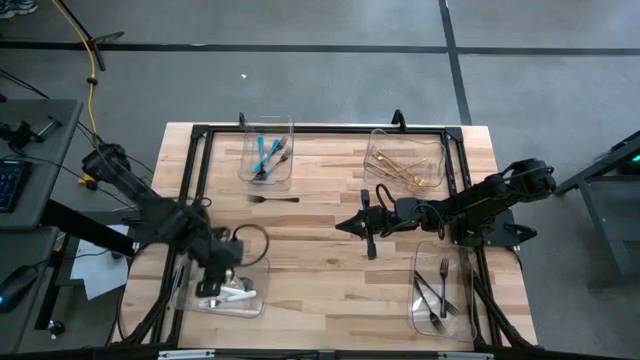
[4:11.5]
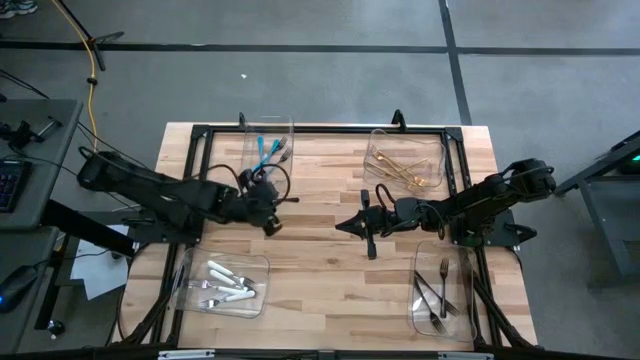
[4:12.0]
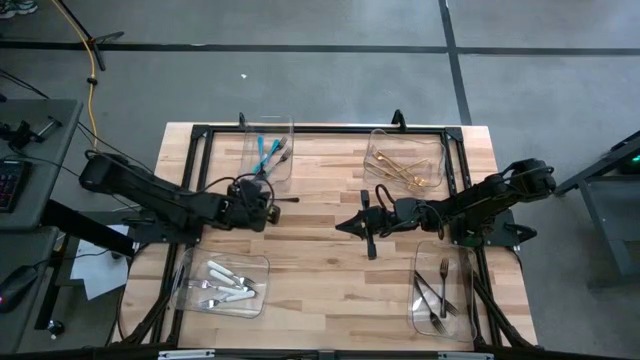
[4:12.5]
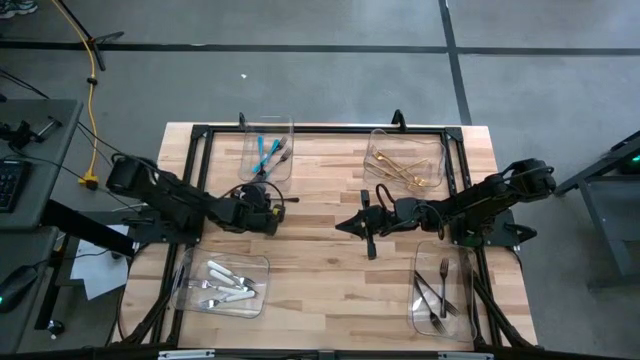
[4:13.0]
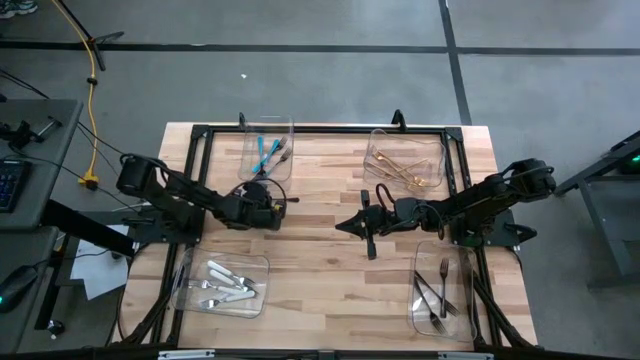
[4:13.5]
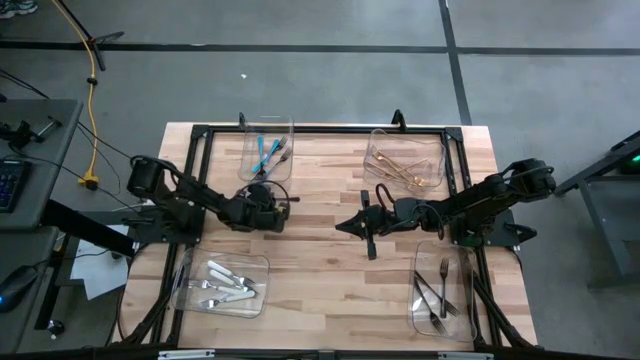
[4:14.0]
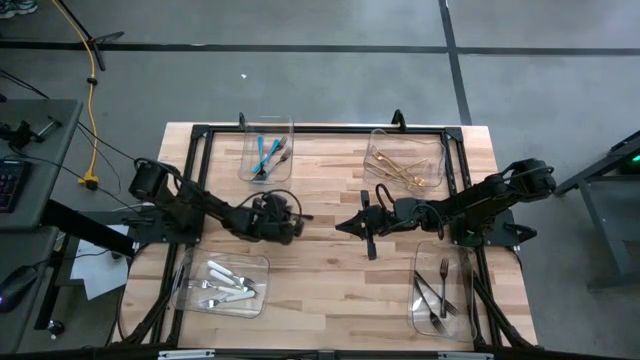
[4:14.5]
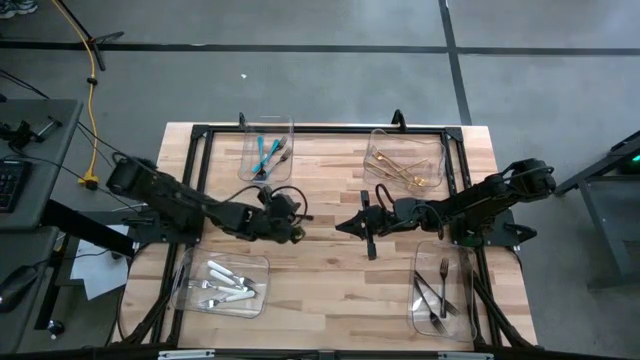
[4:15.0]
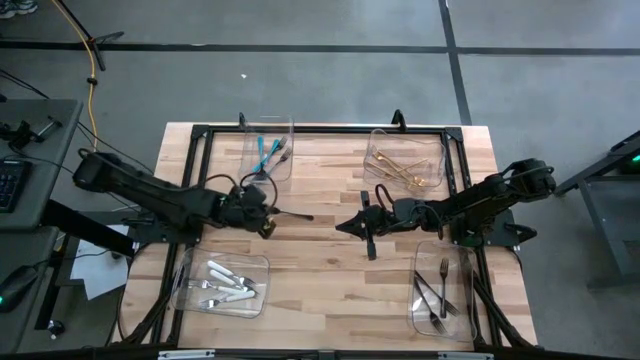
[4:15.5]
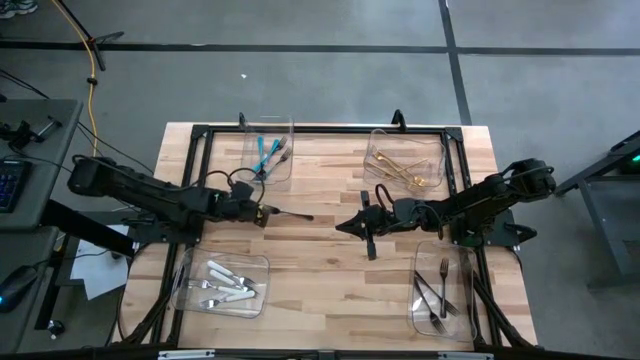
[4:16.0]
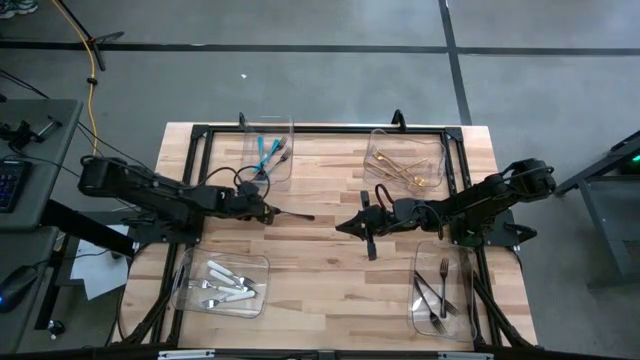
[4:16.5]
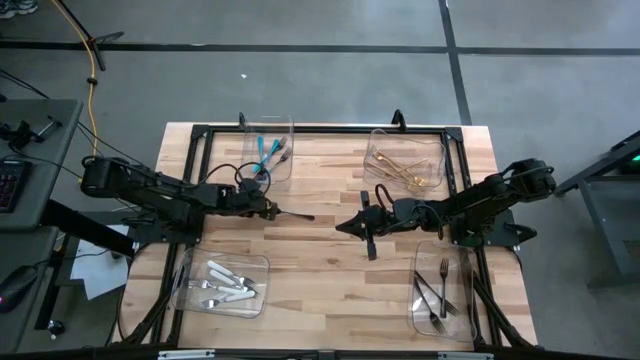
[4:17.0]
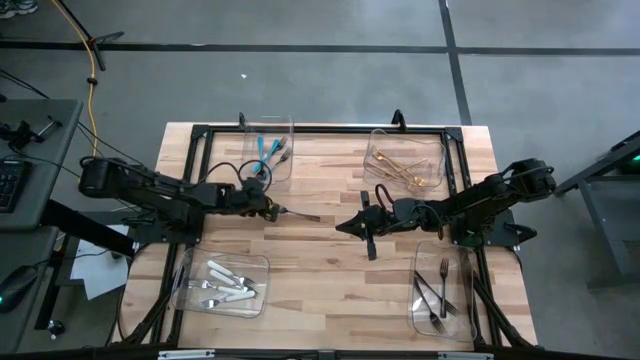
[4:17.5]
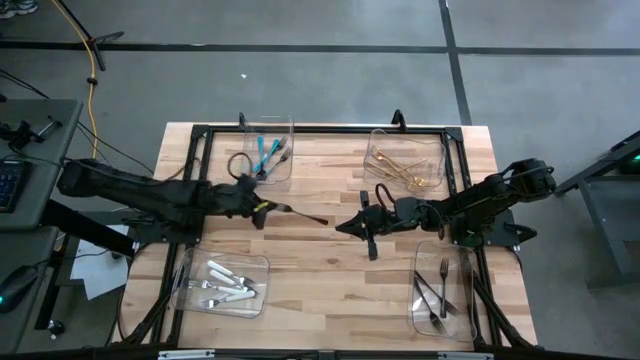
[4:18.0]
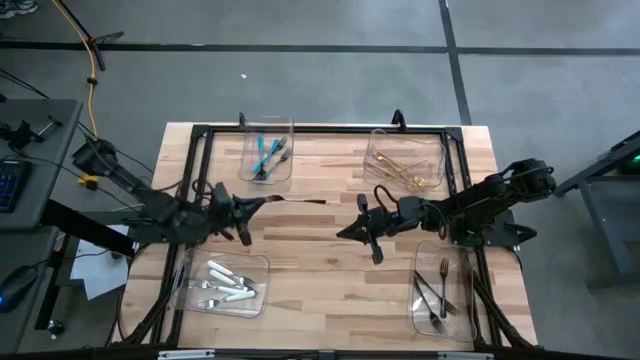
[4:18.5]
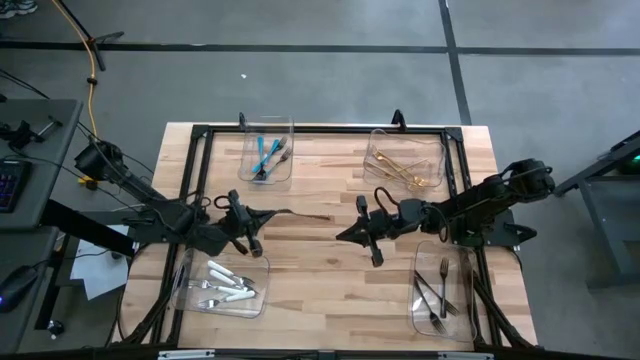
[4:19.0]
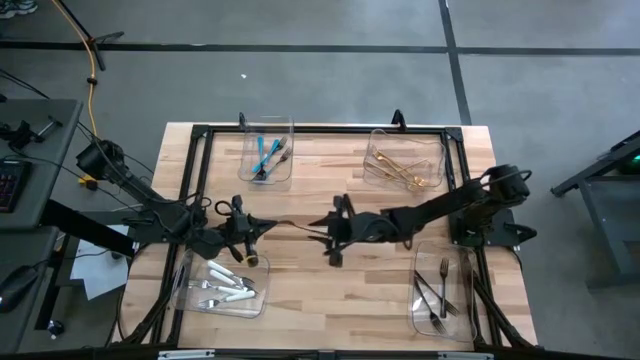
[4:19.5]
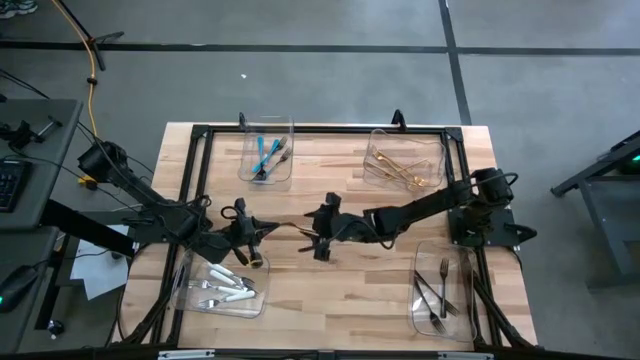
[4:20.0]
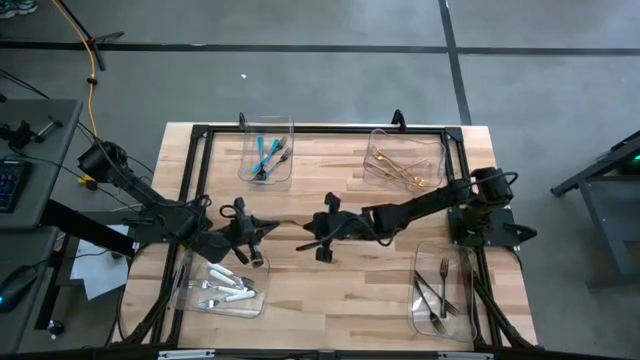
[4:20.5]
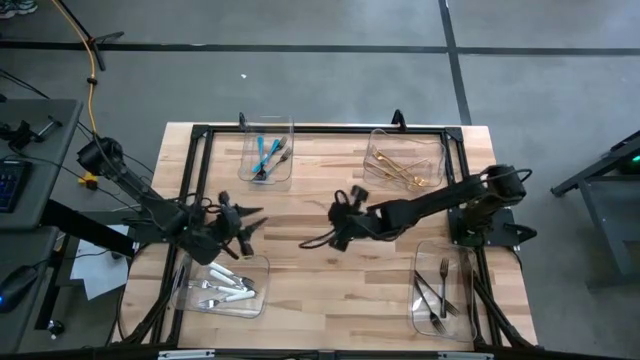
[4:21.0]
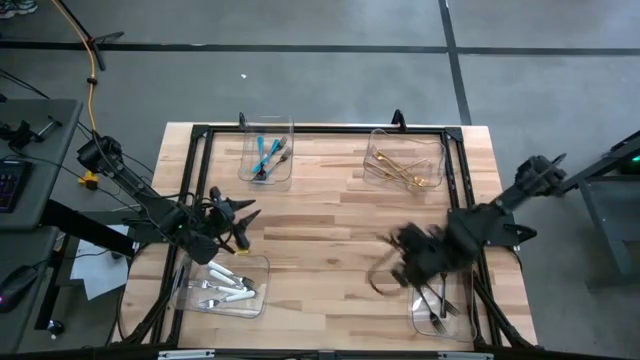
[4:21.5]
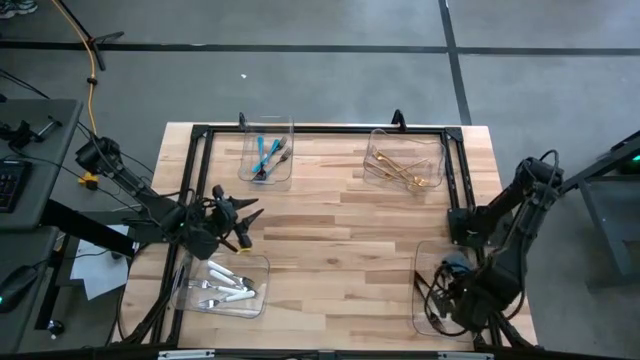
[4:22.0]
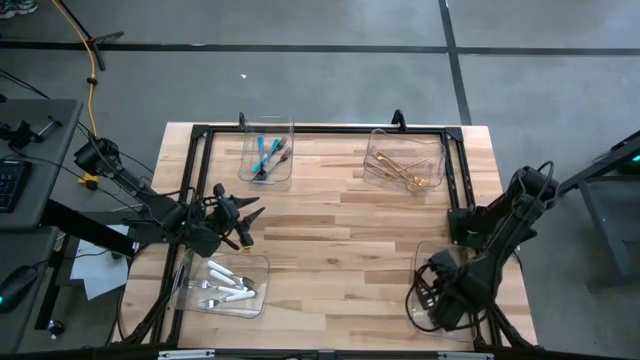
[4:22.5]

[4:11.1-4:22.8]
Task: Sort silverware by color (type)
Put the black fork into the bottom right transparent bin

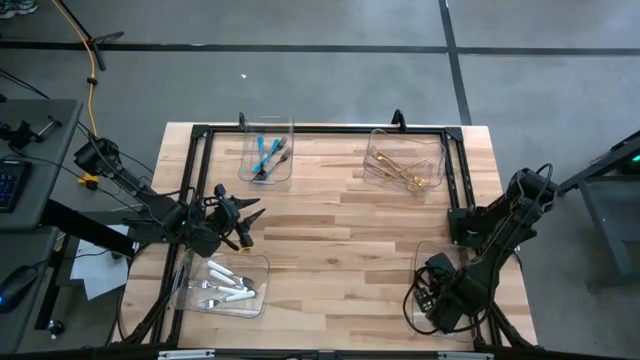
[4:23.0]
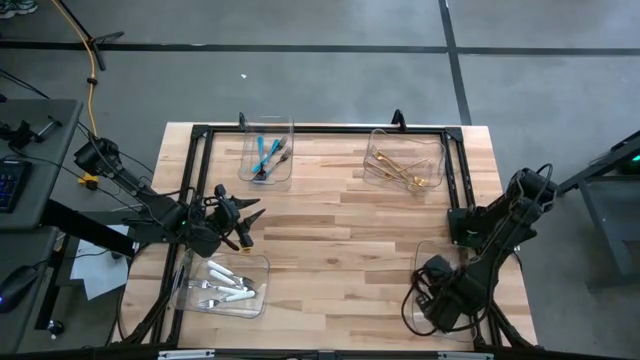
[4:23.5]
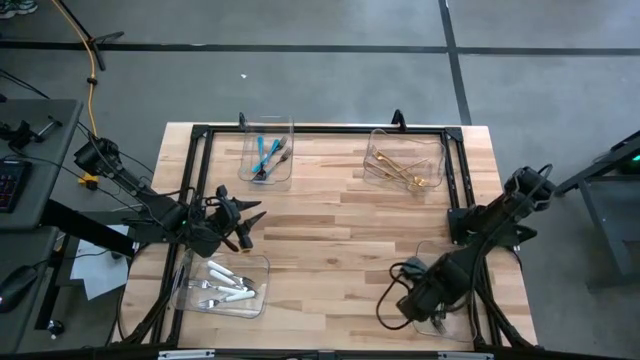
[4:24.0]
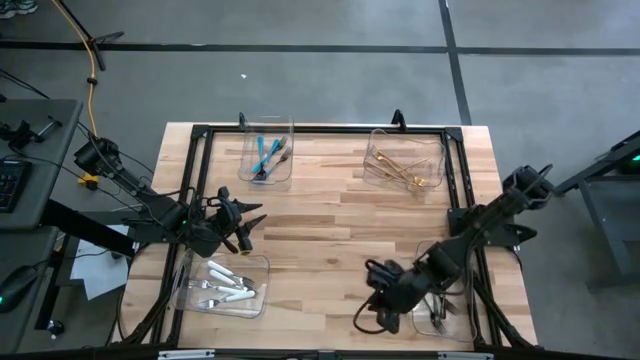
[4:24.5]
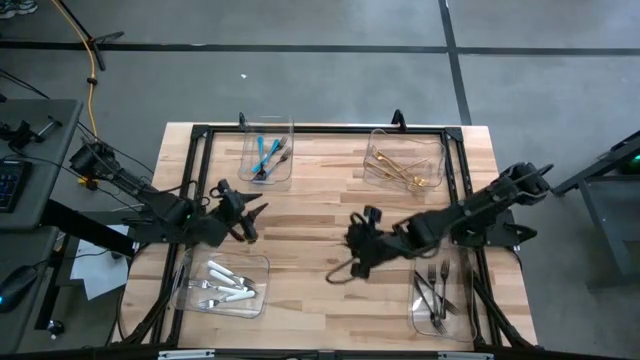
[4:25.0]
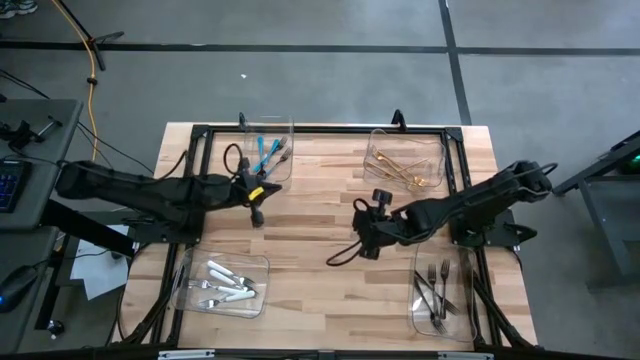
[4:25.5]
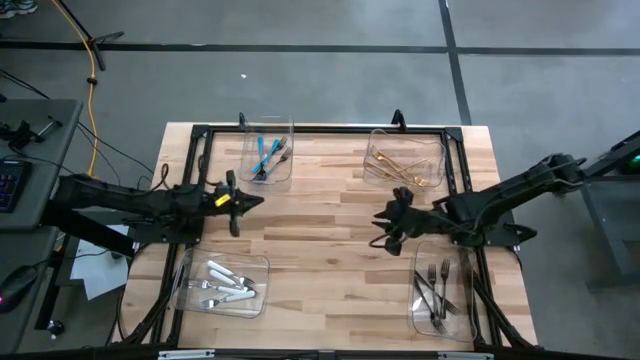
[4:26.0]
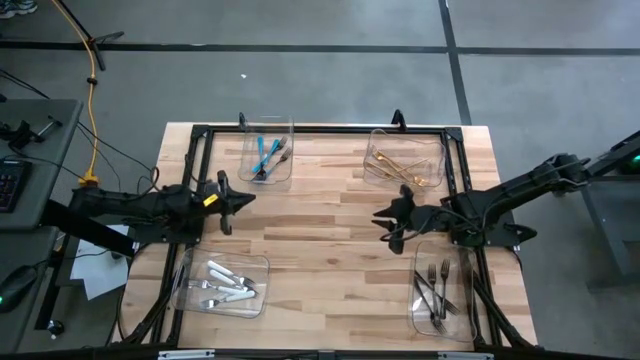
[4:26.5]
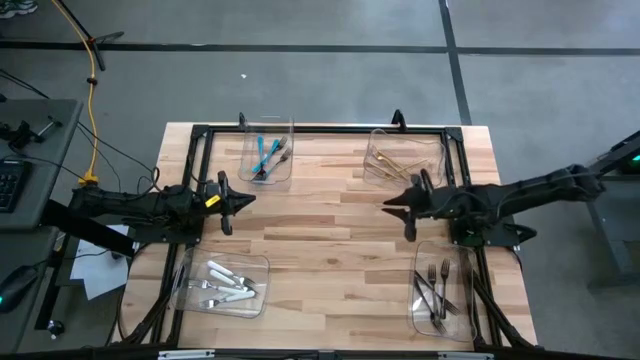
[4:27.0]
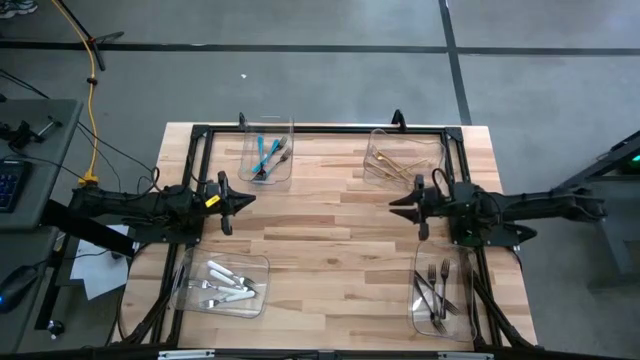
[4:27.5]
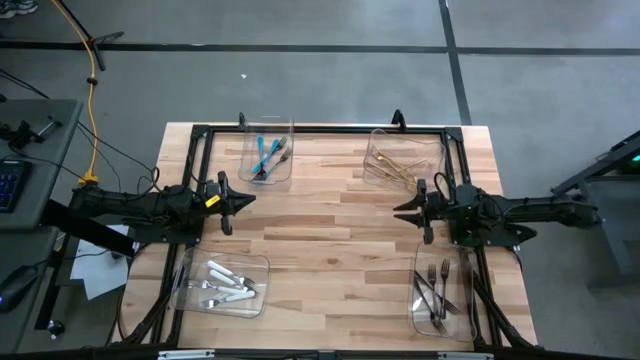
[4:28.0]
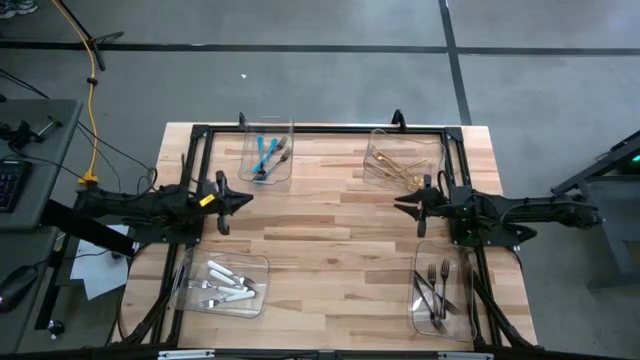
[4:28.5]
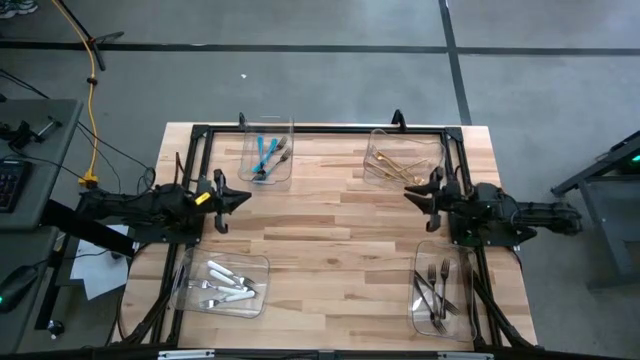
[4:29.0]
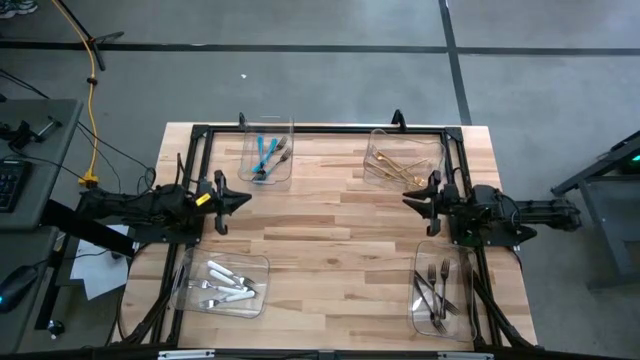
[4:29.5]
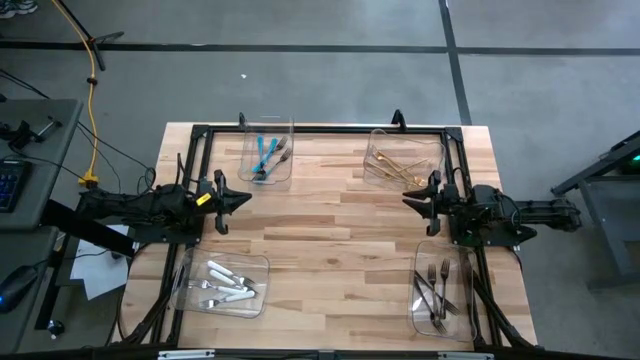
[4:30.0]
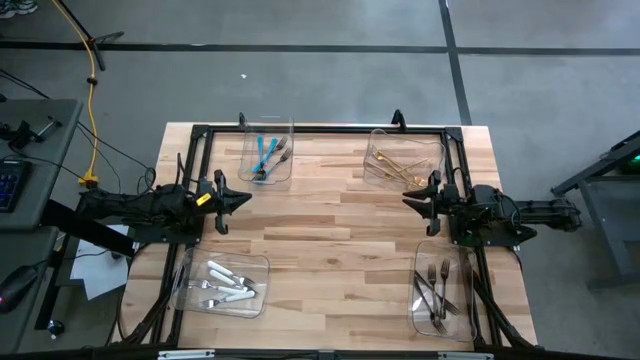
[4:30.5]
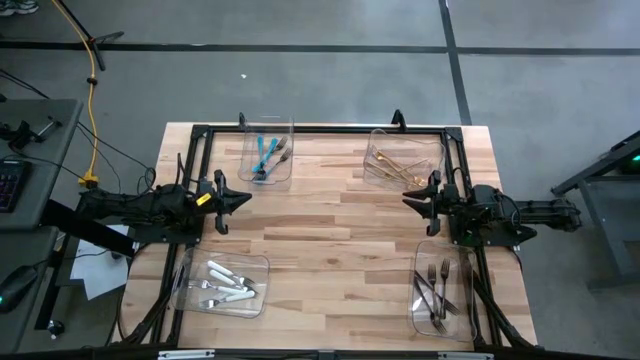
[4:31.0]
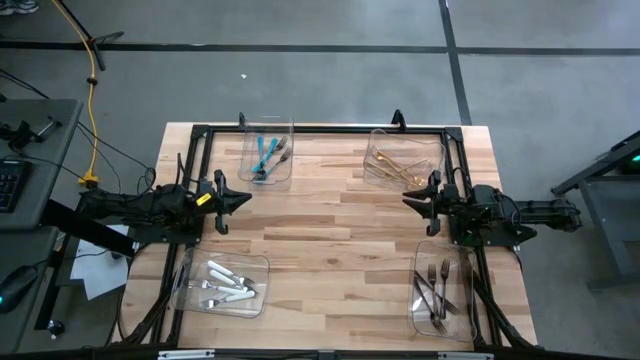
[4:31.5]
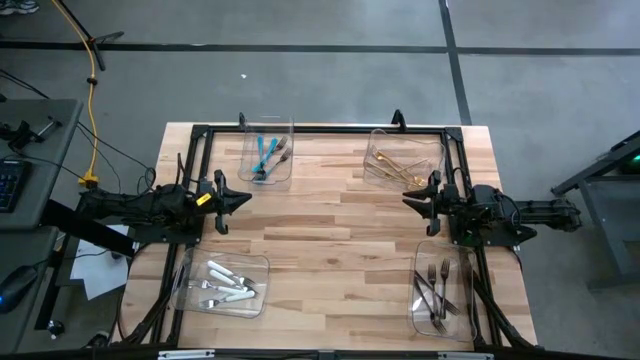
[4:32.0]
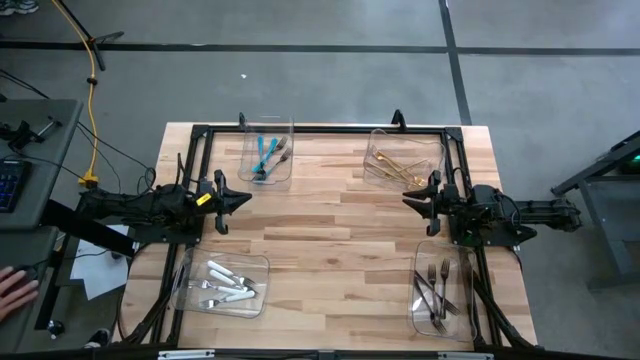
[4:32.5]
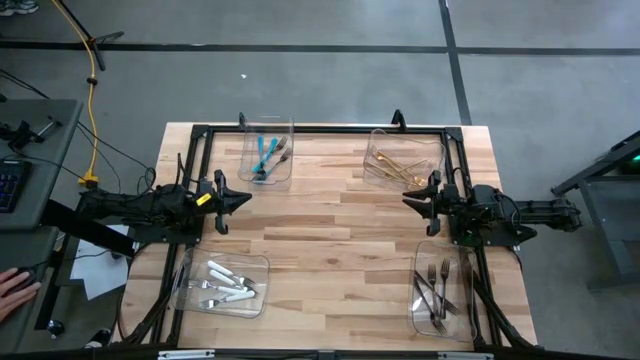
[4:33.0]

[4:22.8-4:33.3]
Return to Home Position
